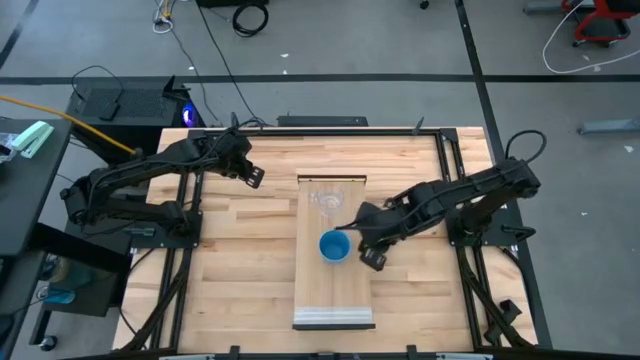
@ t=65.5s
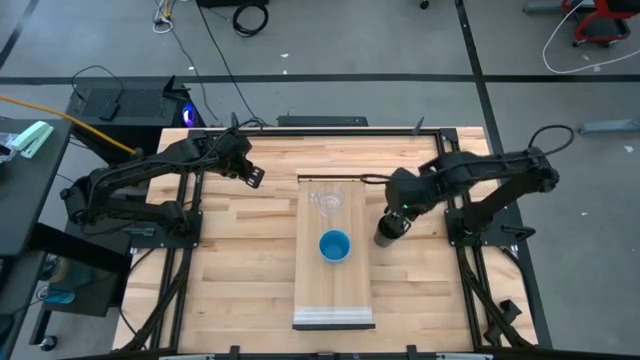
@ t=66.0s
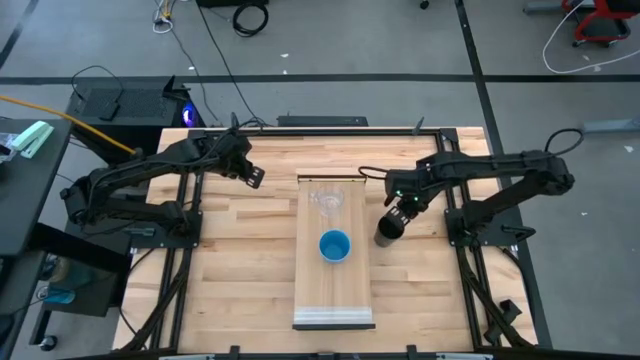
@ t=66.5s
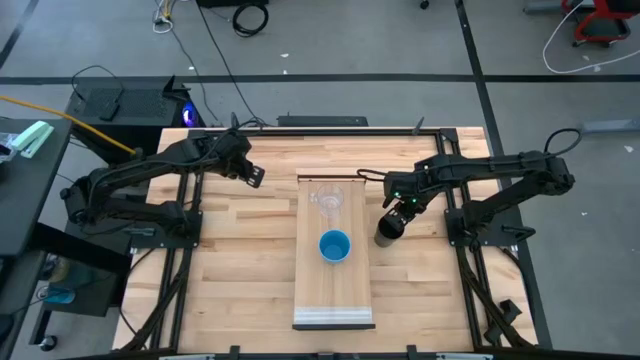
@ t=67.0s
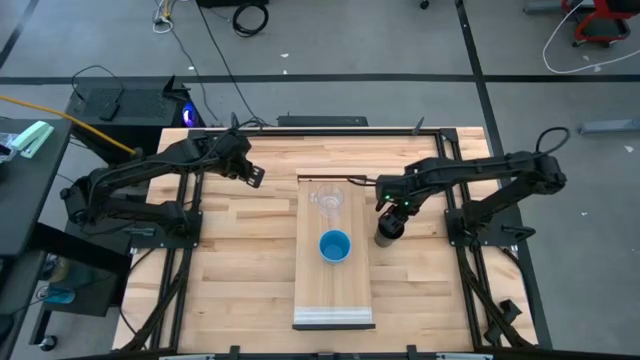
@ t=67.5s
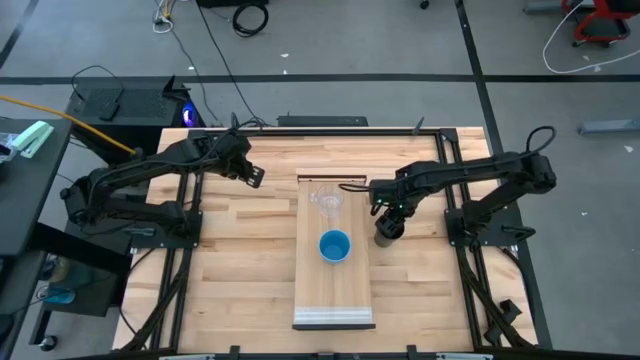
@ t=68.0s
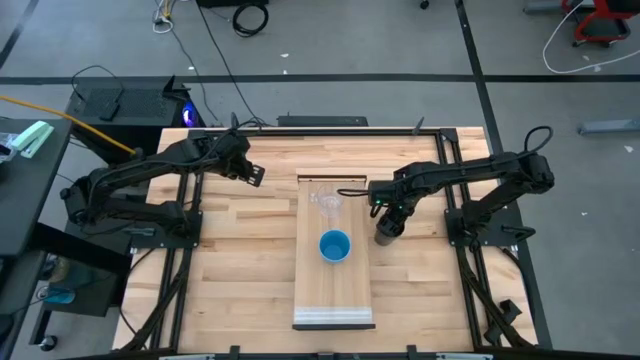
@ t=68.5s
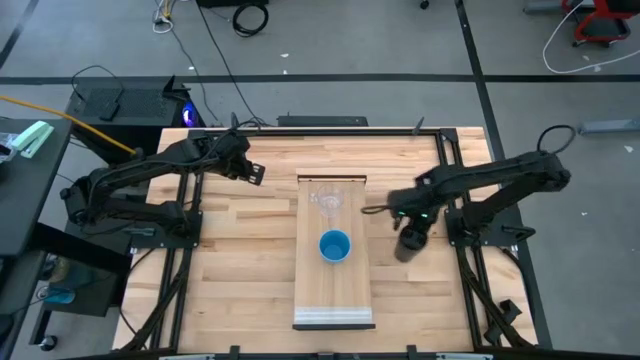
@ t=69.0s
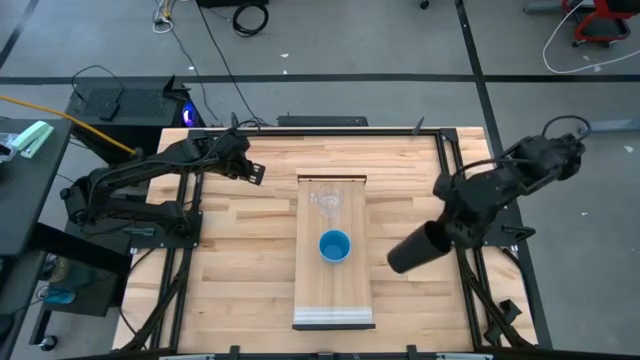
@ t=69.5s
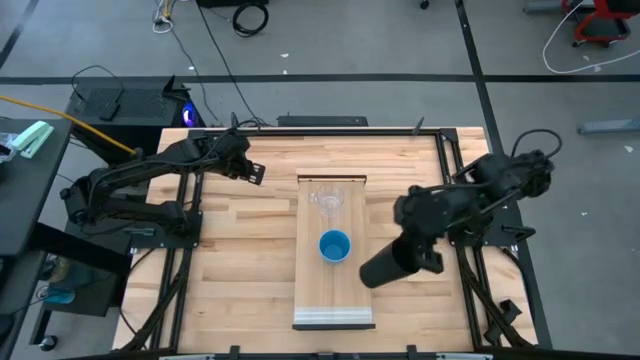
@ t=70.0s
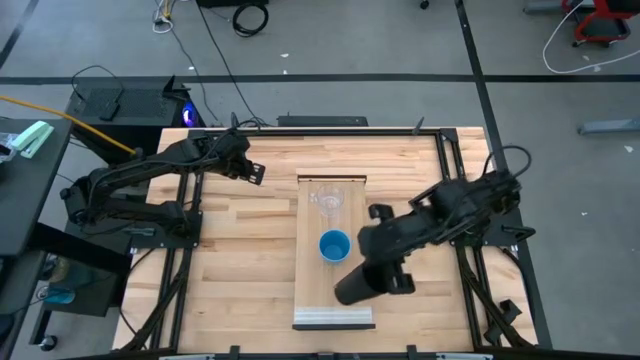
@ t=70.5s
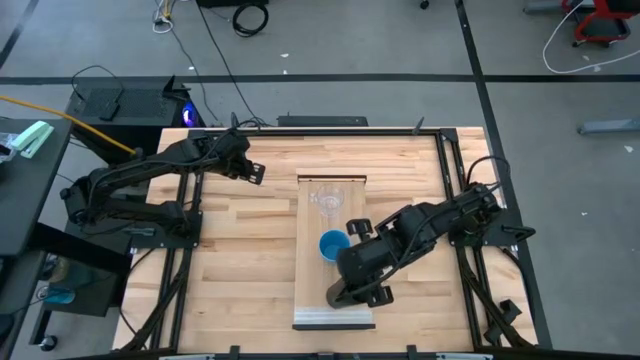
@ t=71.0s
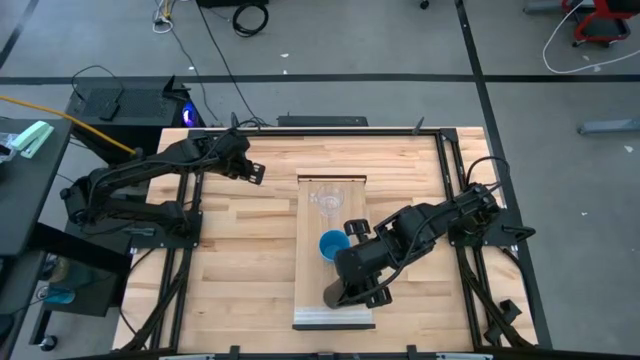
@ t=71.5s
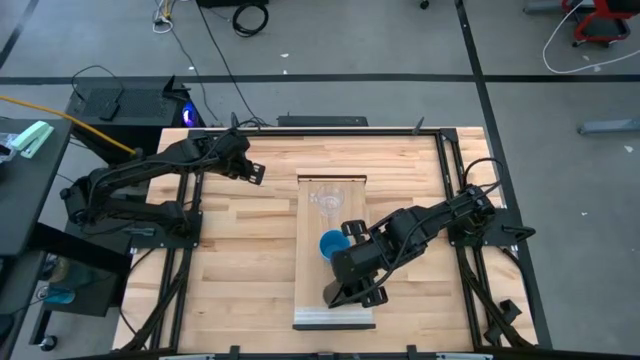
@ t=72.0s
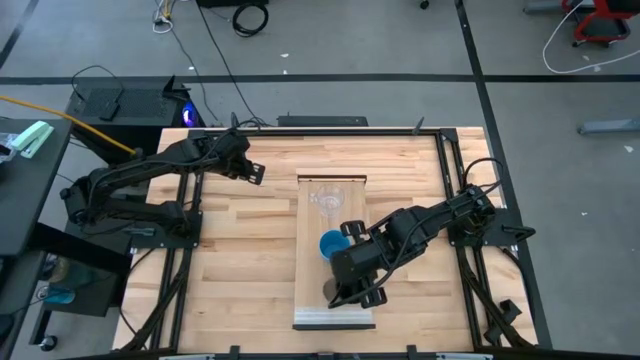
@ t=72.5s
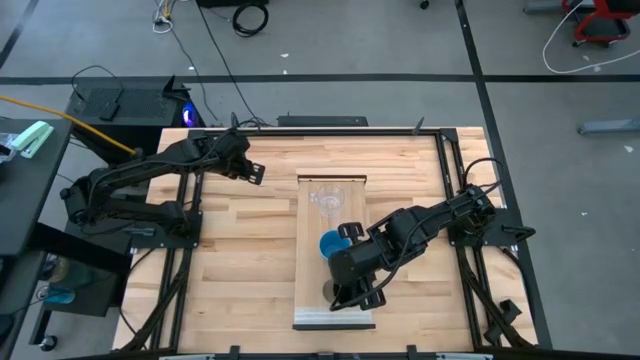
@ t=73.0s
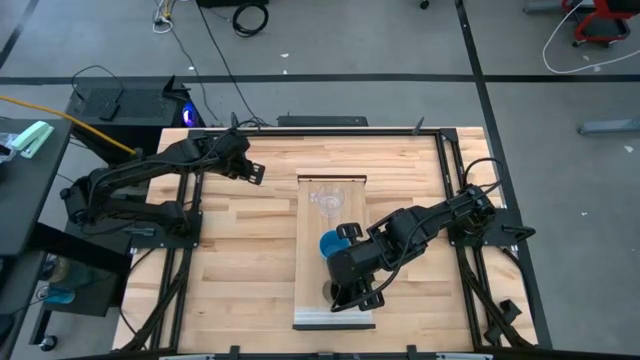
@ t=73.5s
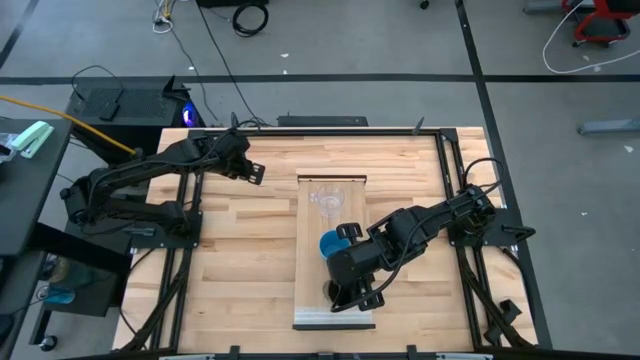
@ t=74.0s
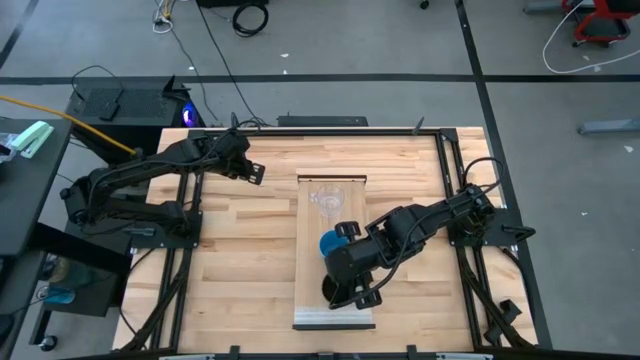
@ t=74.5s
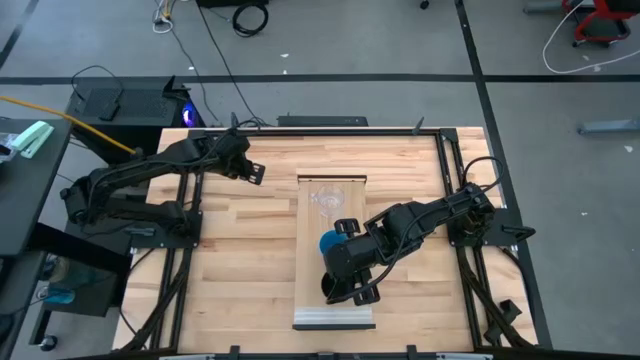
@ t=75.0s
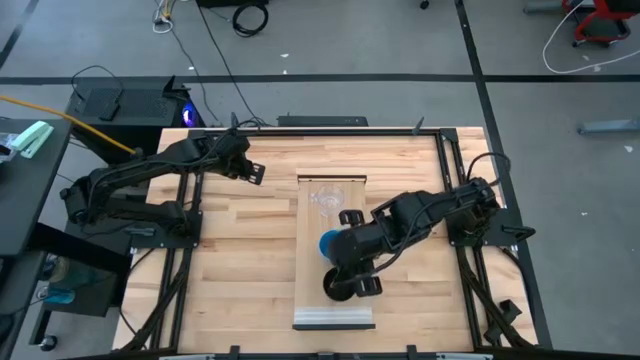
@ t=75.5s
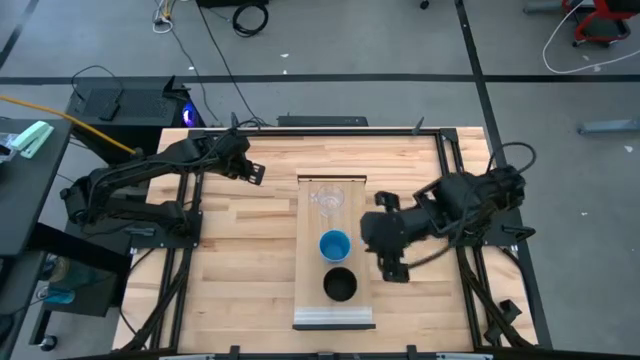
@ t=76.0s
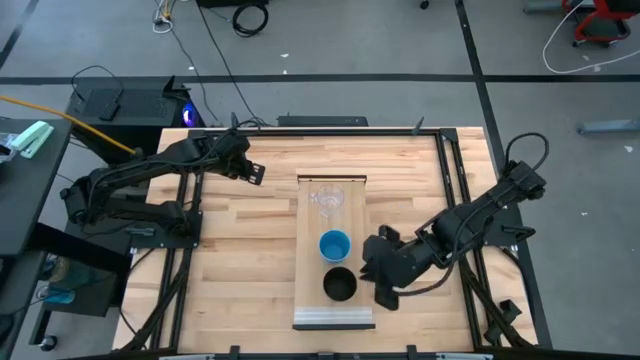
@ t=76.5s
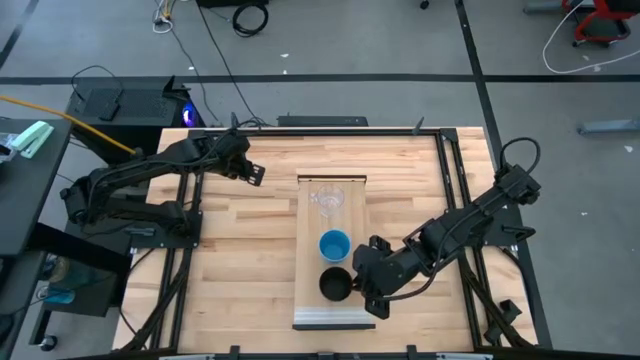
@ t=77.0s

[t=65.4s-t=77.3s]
Task: Stack small to large cups/mugs on shelf
Put the black cup on the shelf

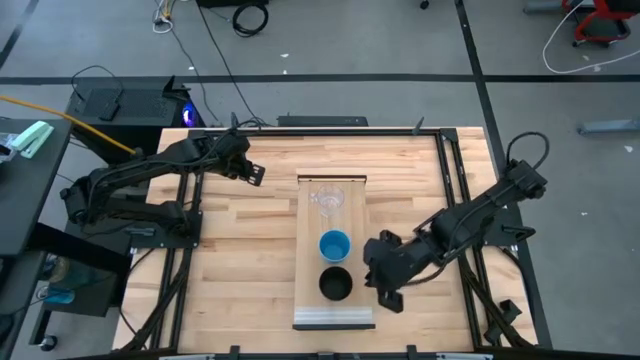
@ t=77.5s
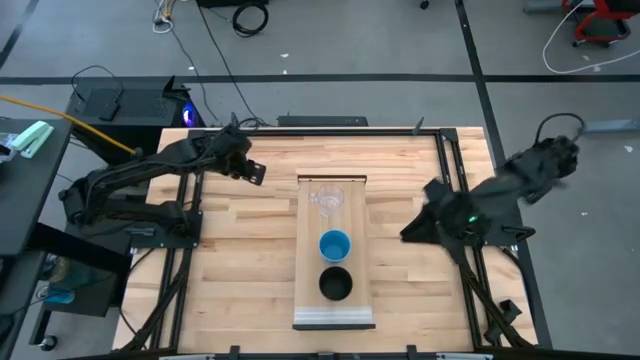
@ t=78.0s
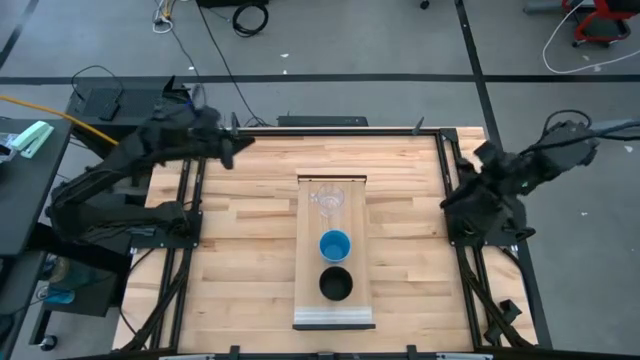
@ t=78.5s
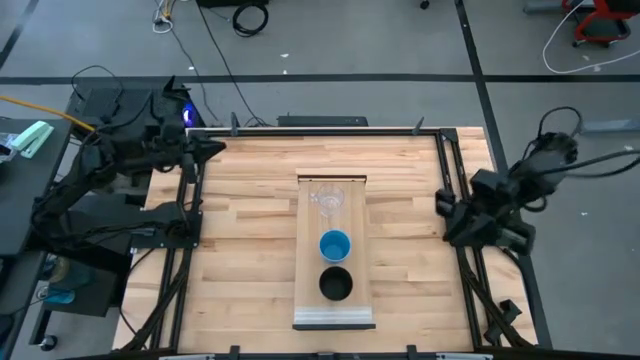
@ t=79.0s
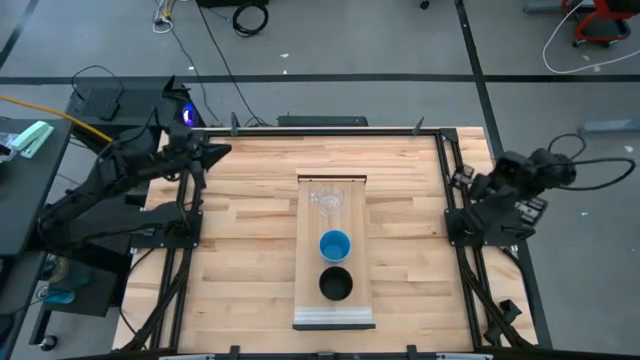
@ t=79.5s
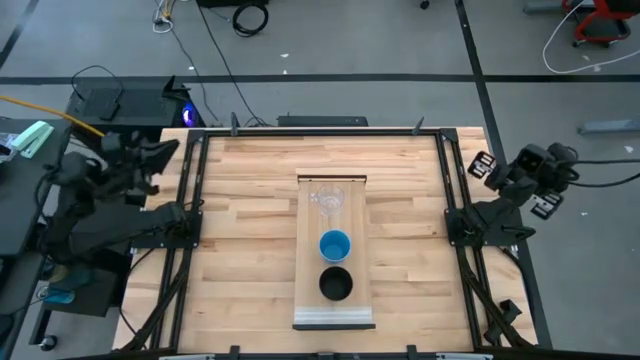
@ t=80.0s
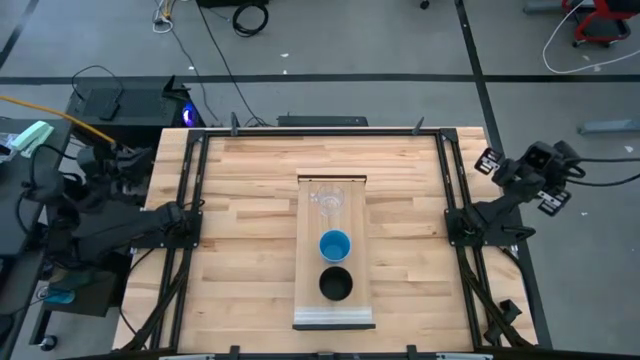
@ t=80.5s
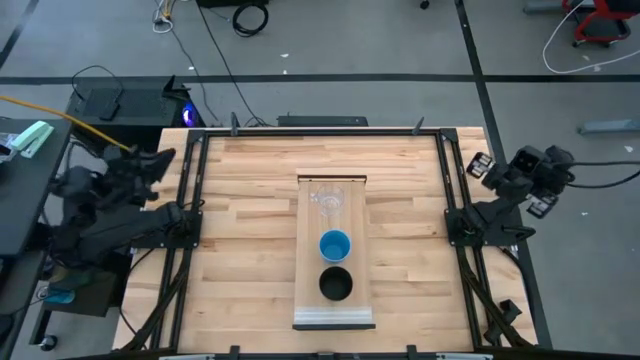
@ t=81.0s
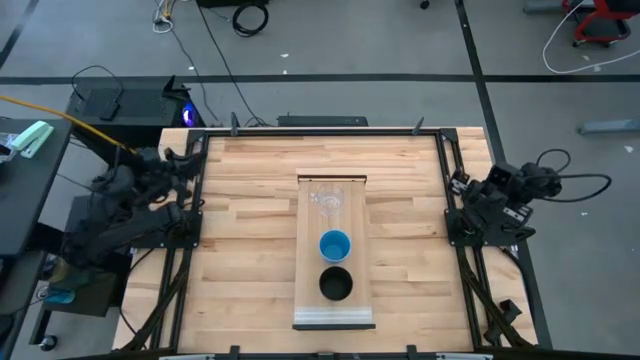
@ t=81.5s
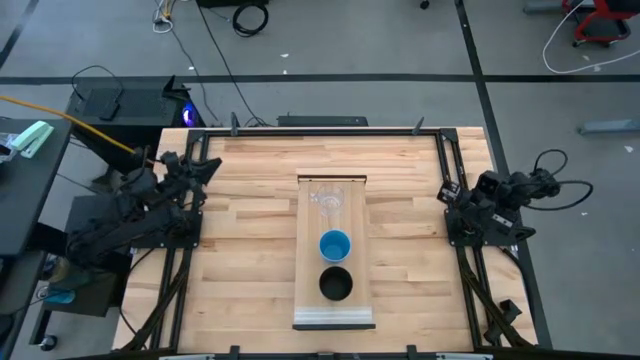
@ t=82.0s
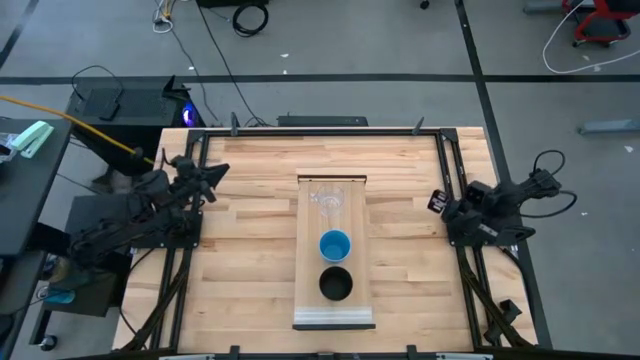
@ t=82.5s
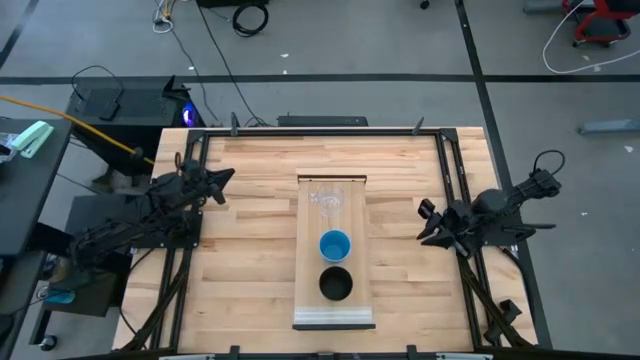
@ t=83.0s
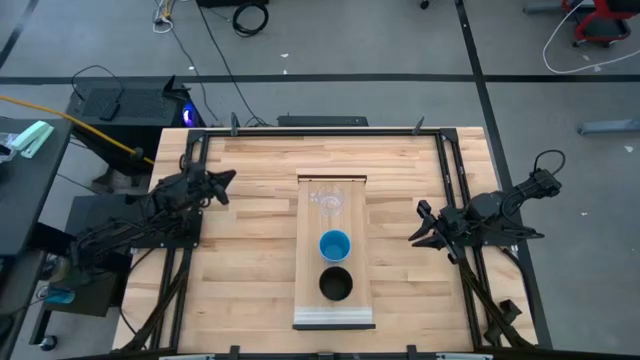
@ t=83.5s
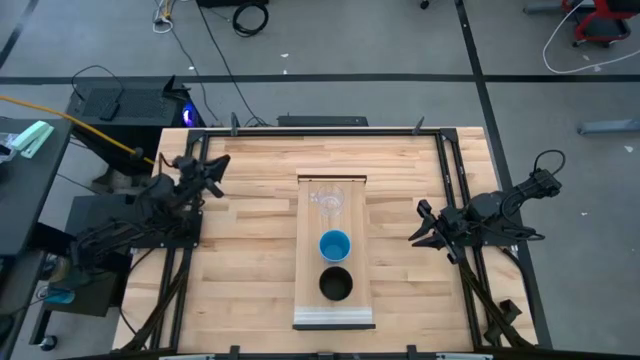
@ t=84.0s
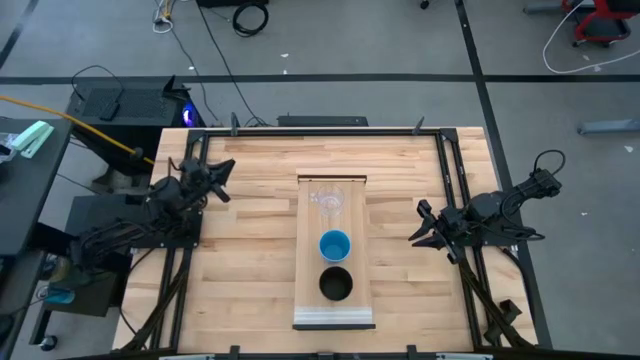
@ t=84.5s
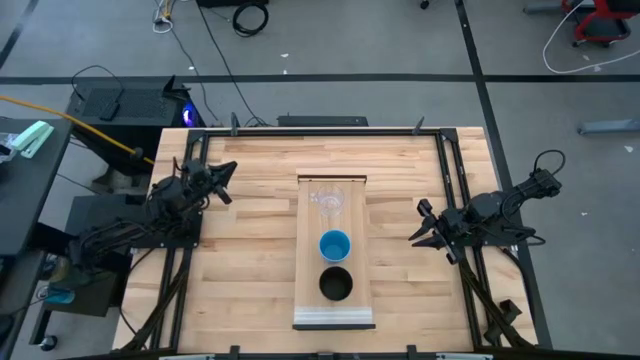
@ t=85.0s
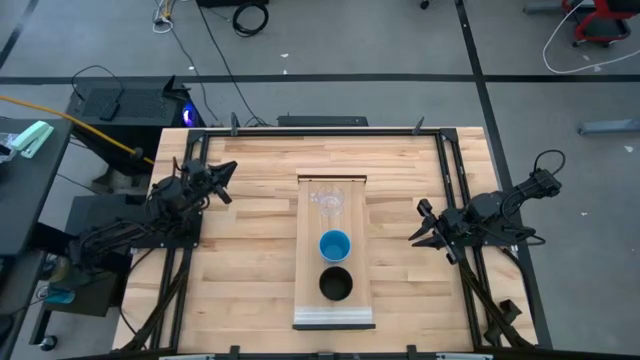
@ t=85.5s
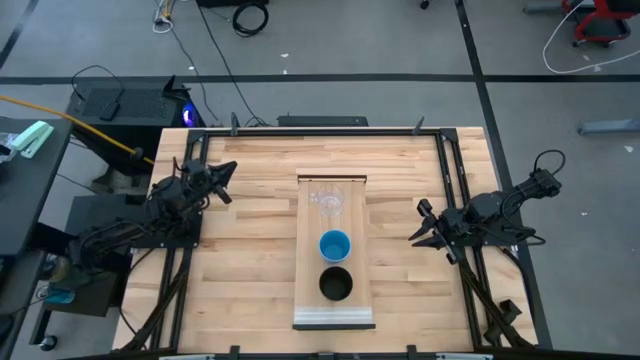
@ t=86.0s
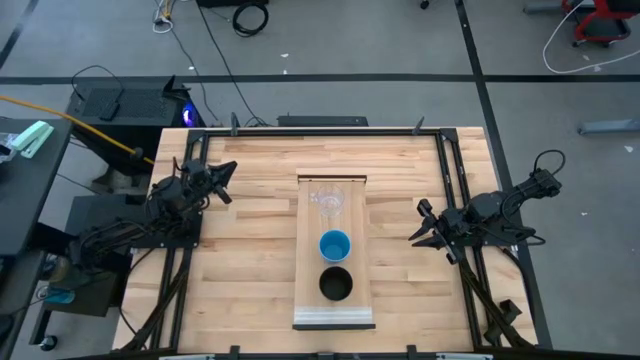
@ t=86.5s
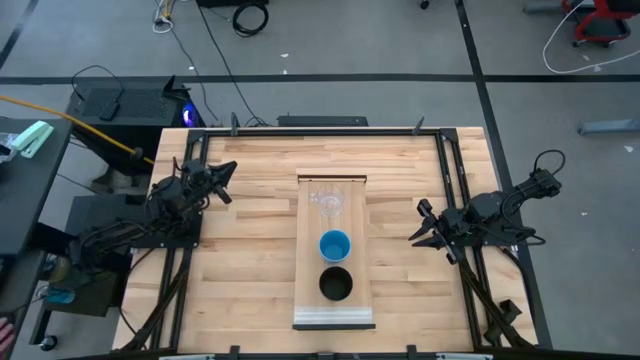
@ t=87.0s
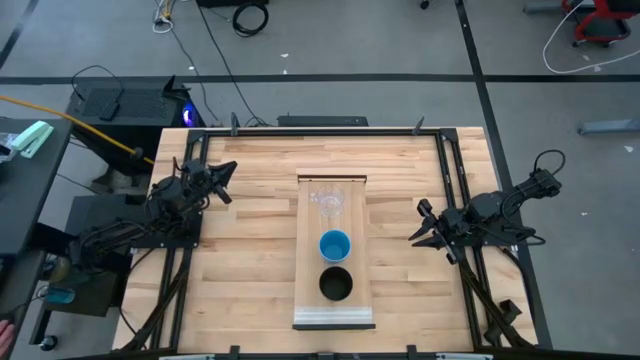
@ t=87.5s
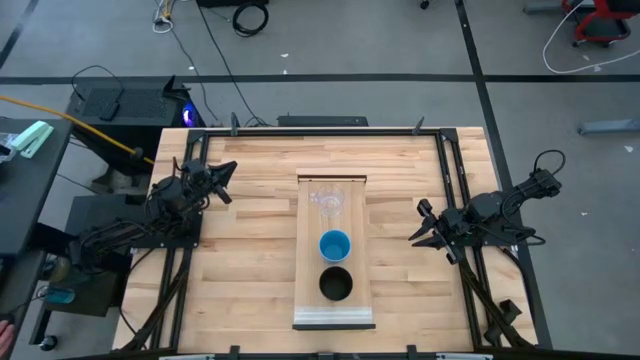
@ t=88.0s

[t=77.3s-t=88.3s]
Return to Home Position
